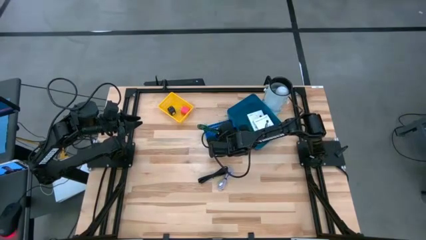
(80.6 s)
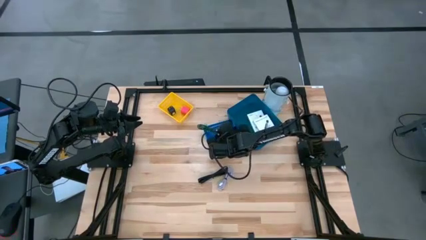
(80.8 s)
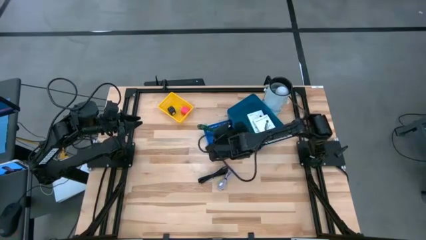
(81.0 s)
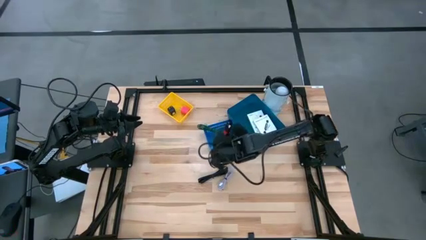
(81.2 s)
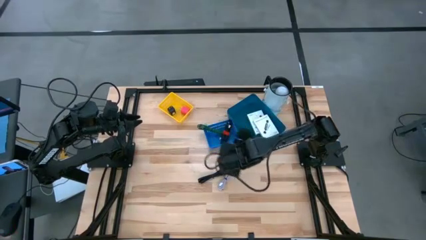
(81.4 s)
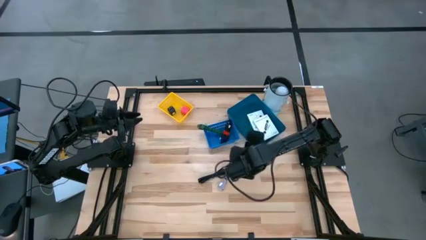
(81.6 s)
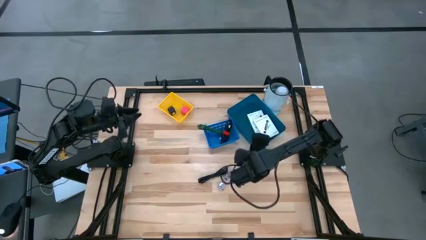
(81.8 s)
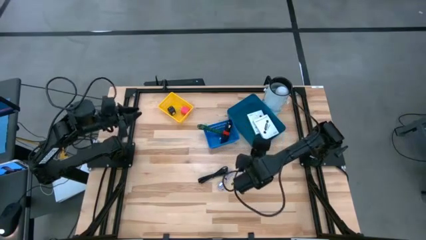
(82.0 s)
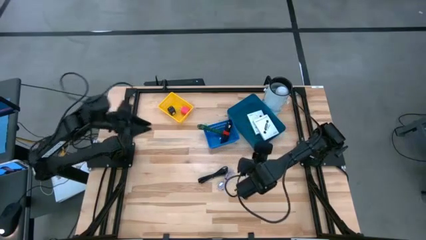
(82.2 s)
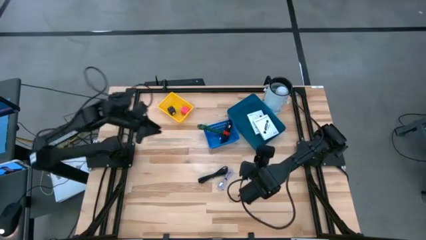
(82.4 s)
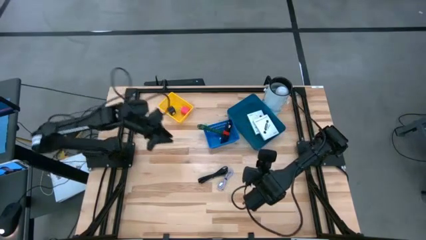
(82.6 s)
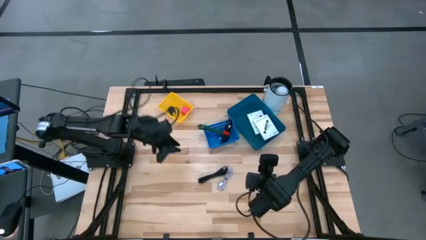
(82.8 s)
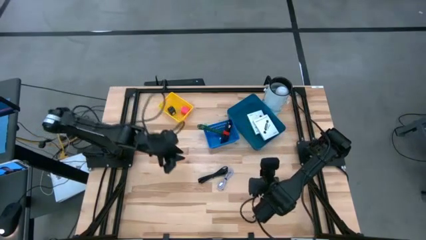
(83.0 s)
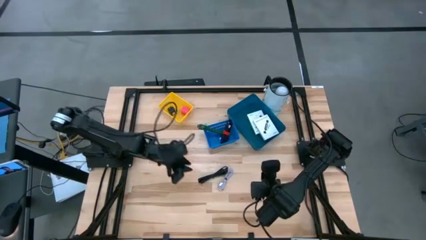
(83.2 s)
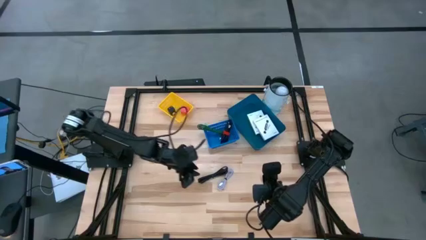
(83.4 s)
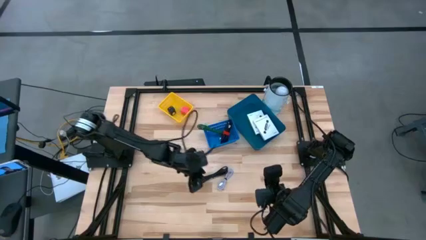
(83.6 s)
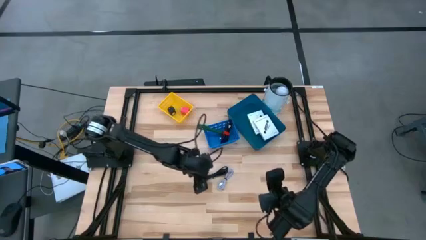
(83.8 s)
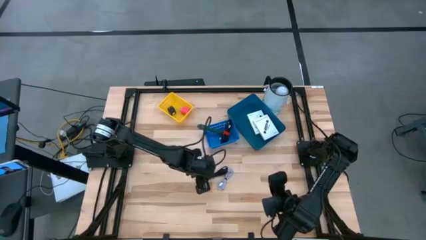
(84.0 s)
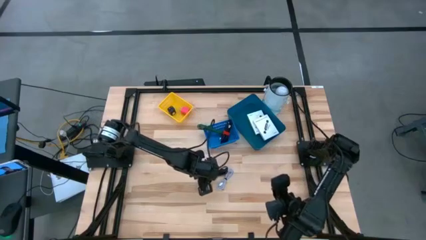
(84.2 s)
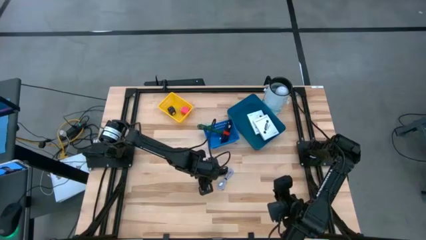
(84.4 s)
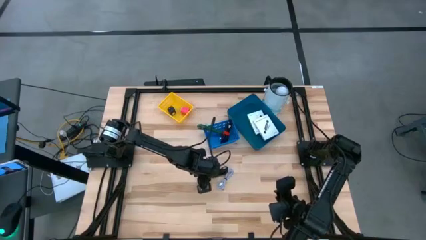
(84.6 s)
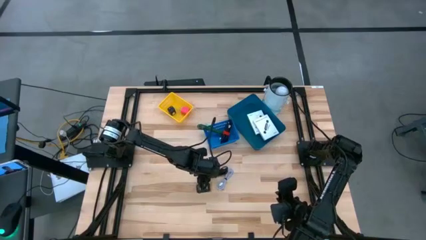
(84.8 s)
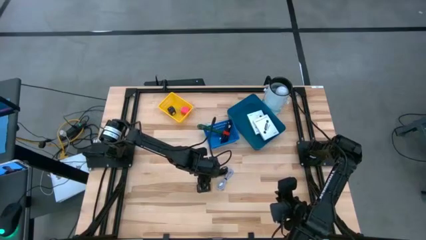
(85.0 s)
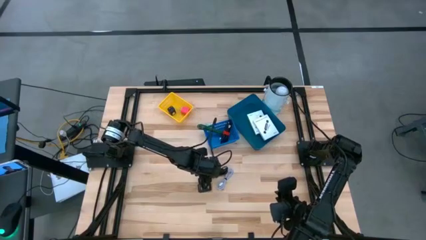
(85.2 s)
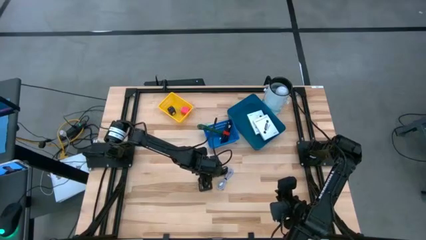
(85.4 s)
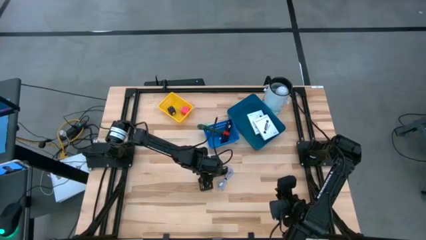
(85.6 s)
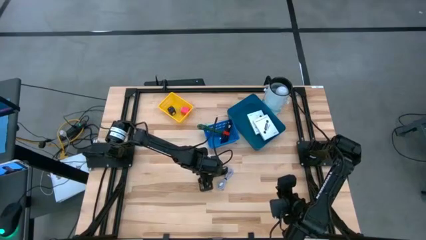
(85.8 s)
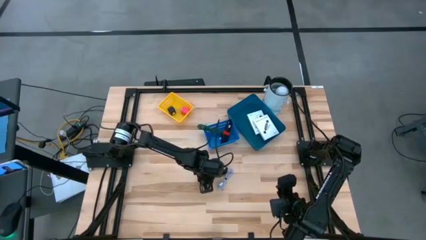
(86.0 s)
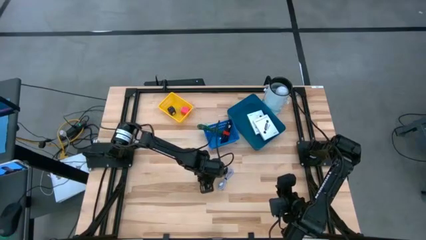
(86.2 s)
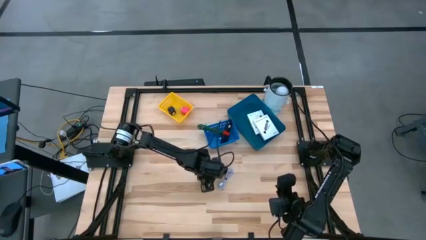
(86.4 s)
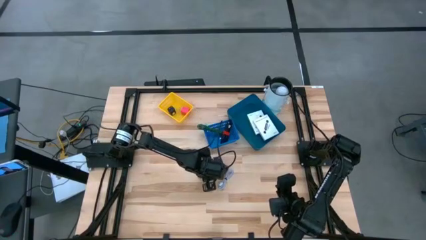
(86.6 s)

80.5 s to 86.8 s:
Task: Pick and place items into bin
Put the black USB cable into the blue bin

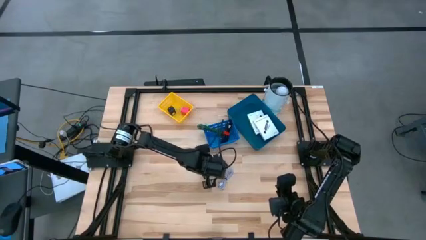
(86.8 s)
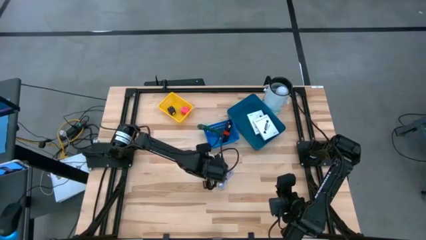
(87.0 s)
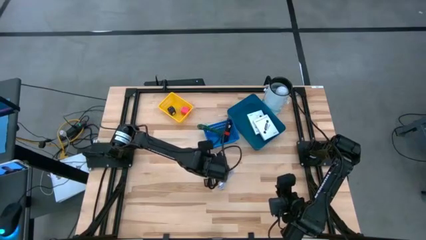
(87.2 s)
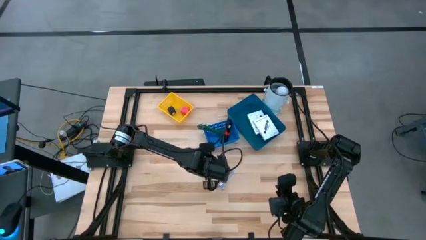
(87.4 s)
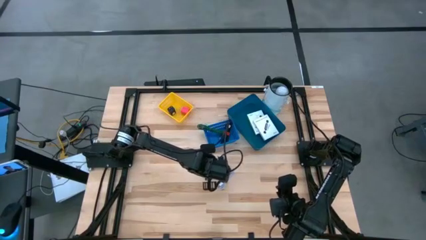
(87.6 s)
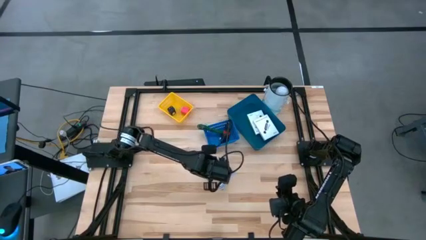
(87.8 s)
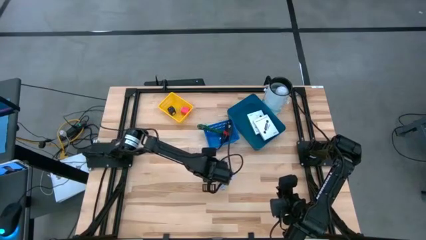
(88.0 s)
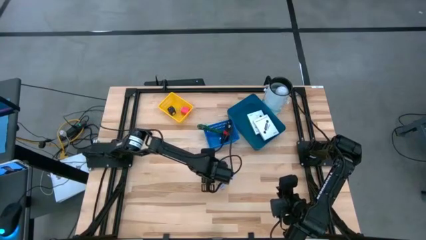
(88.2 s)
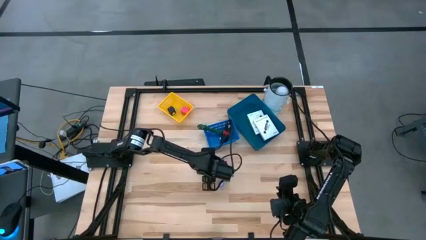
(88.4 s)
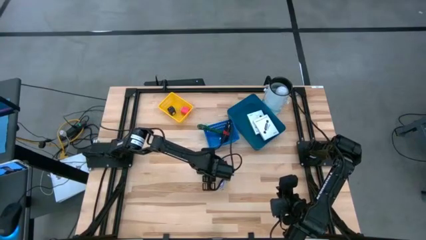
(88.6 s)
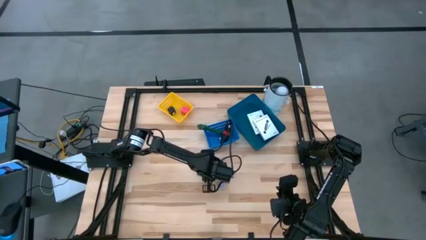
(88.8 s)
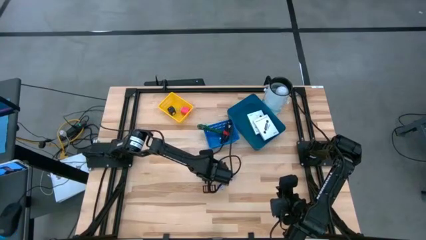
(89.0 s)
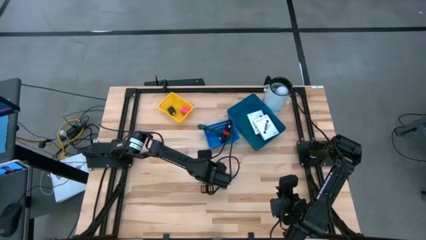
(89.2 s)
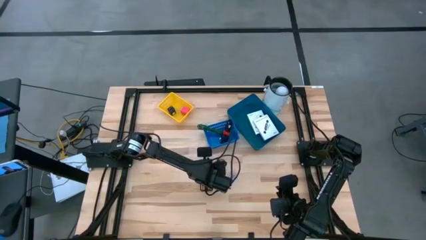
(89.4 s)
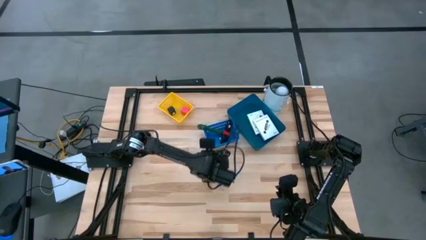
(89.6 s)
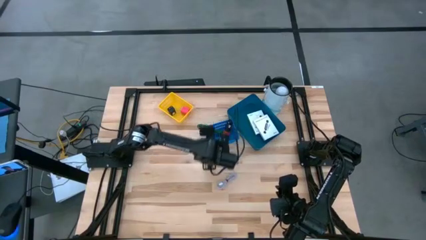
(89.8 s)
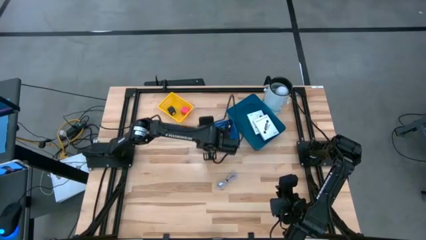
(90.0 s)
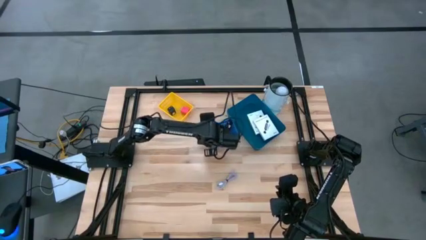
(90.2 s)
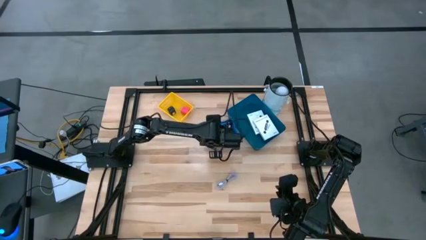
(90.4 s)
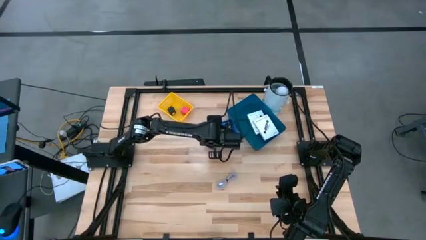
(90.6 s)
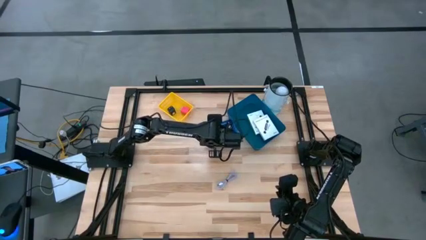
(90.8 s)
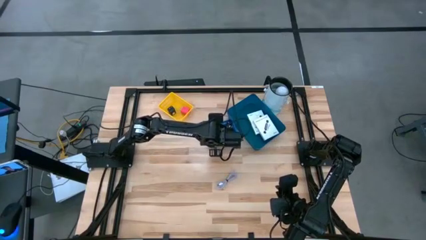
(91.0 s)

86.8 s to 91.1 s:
Put the black USB cable into the blue bin

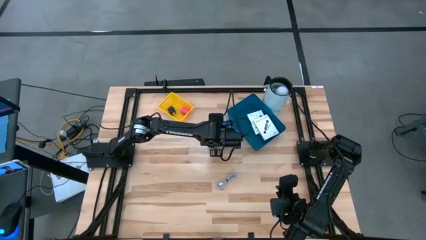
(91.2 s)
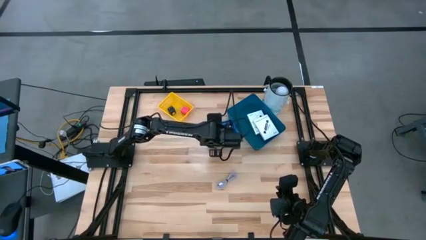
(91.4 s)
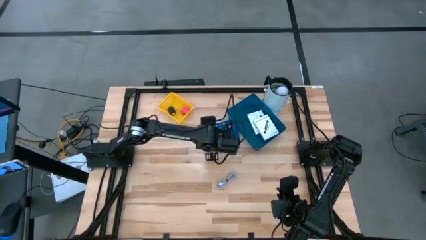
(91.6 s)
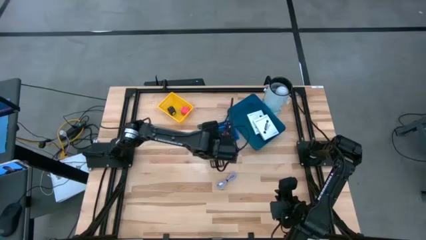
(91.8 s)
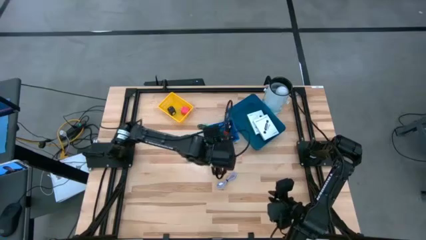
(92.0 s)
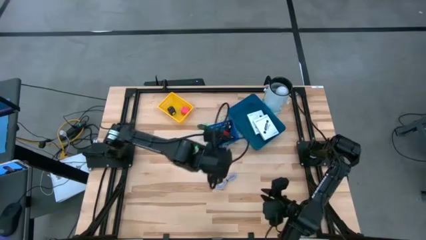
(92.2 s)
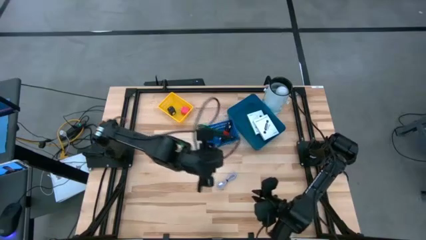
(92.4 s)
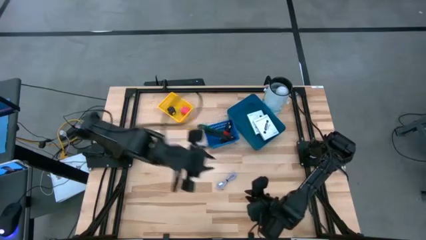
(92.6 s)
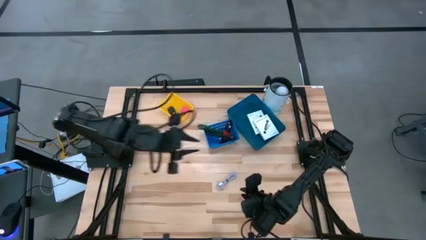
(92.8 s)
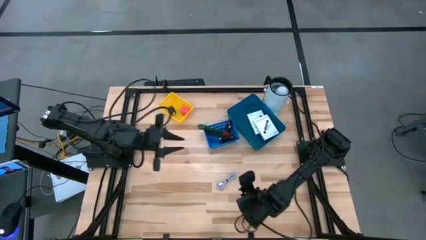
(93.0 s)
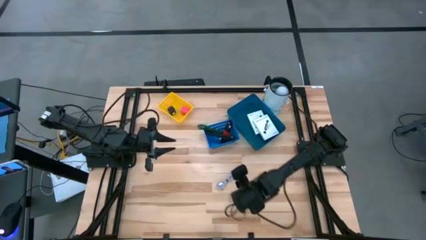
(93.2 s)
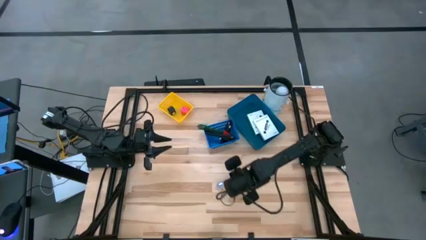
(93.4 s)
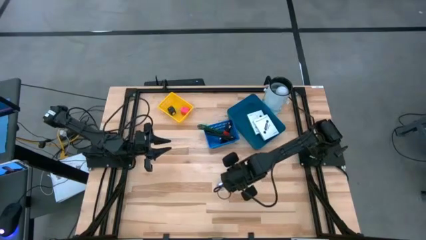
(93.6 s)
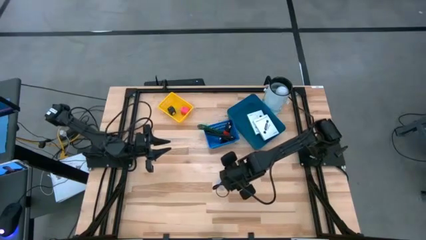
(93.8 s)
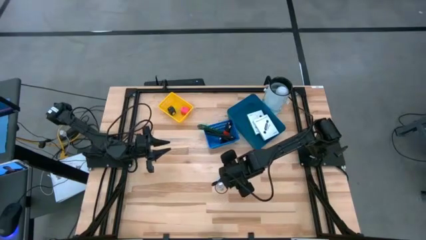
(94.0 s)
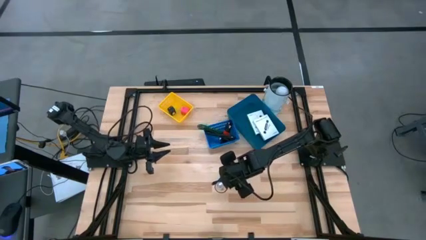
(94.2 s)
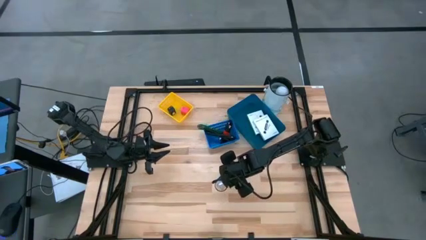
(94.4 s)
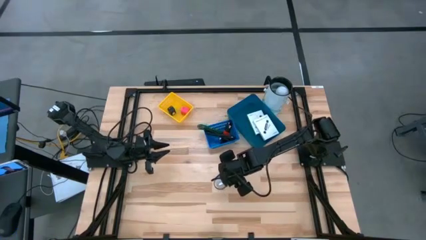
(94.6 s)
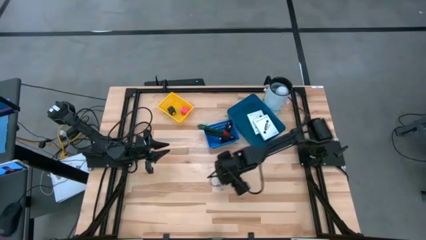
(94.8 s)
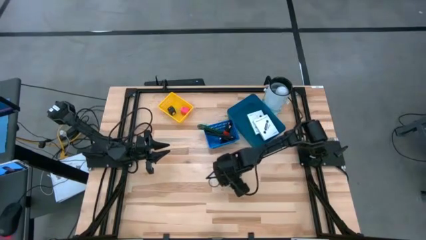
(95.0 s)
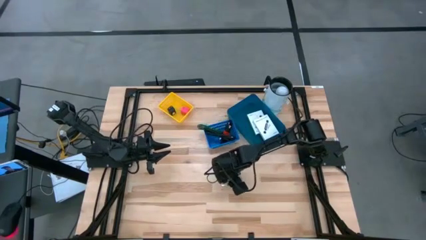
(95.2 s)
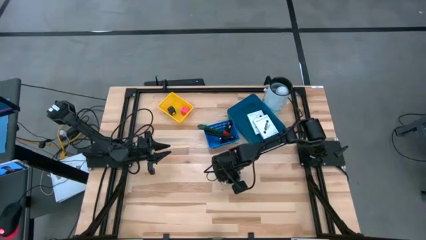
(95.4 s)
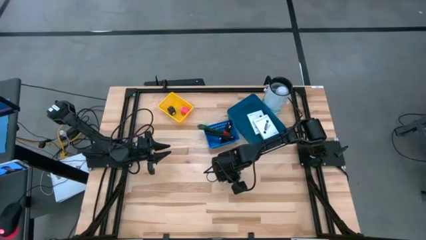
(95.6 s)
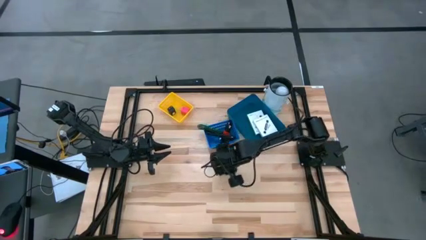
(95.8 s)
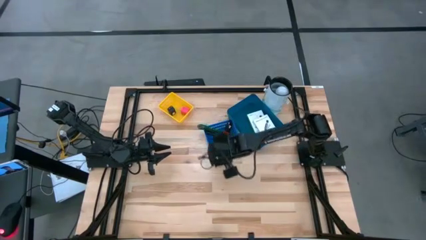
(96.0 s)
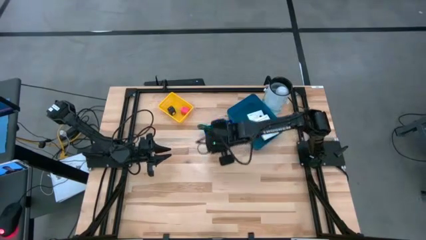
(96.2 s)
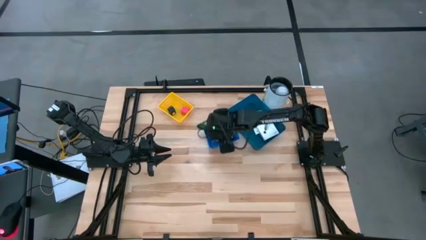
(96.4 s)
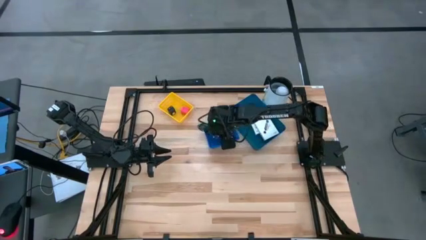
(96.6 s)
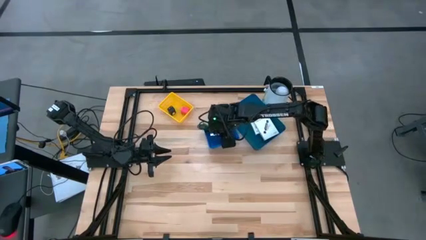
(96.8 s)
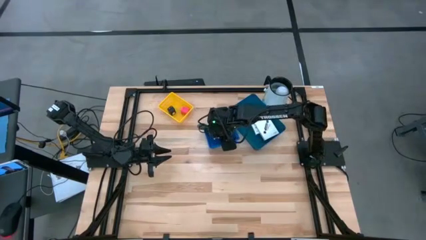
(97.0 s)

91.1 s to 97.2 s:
Put the gray USB cable into the blue bin
